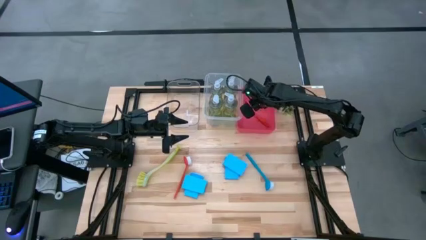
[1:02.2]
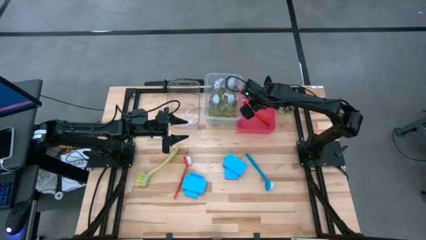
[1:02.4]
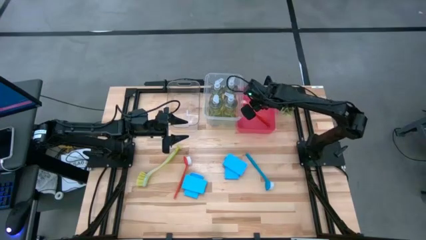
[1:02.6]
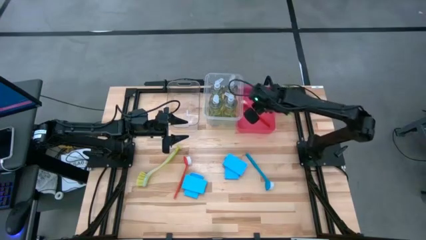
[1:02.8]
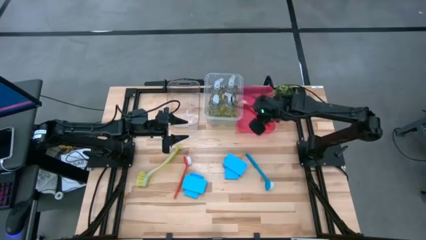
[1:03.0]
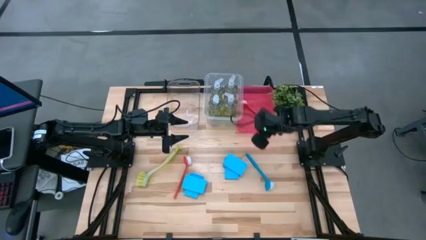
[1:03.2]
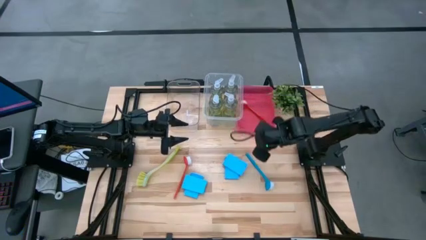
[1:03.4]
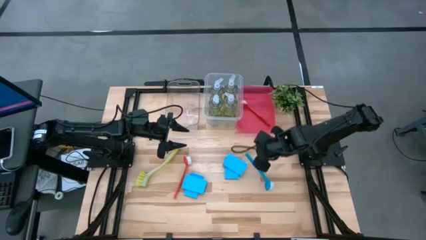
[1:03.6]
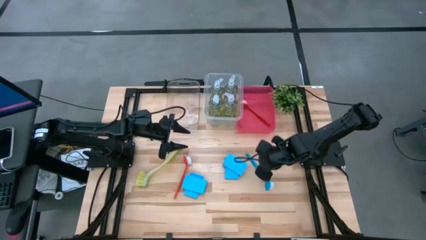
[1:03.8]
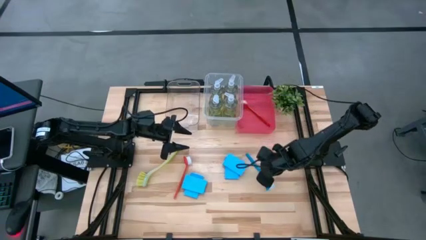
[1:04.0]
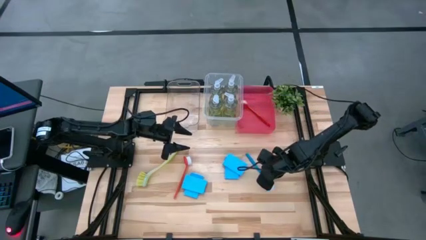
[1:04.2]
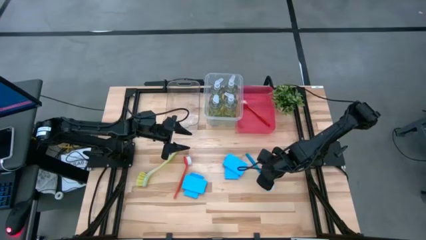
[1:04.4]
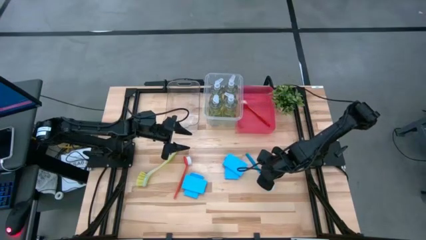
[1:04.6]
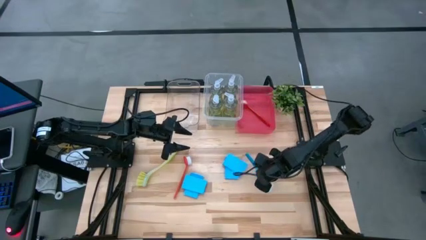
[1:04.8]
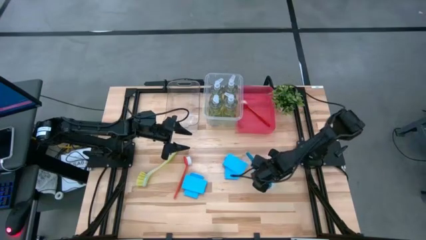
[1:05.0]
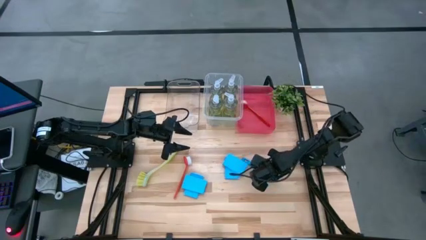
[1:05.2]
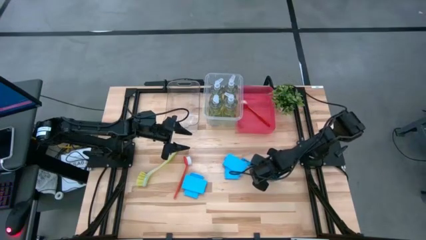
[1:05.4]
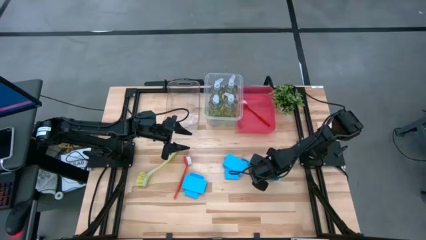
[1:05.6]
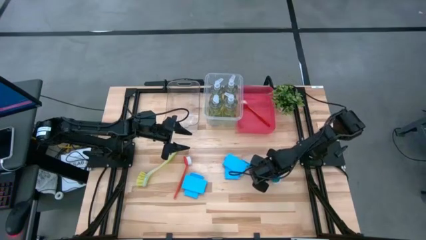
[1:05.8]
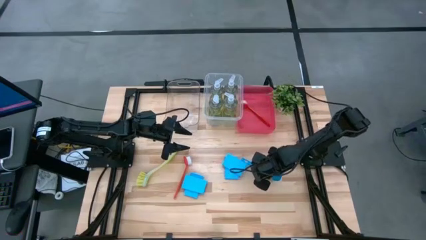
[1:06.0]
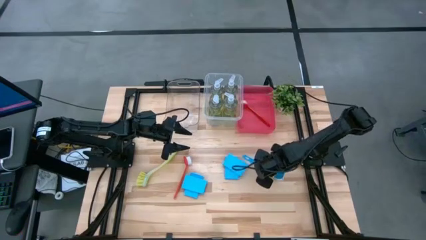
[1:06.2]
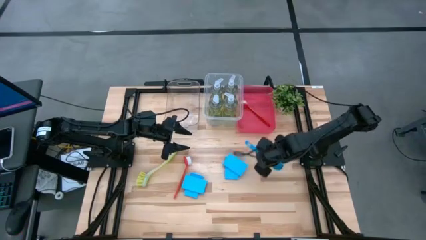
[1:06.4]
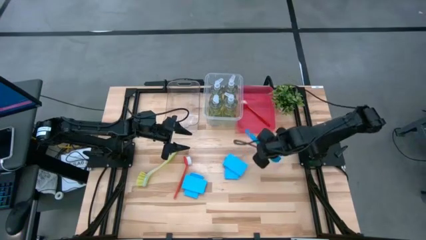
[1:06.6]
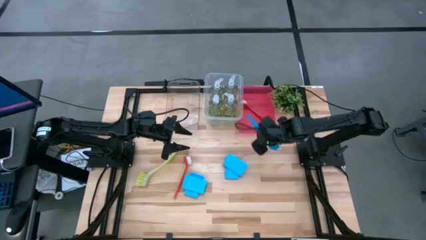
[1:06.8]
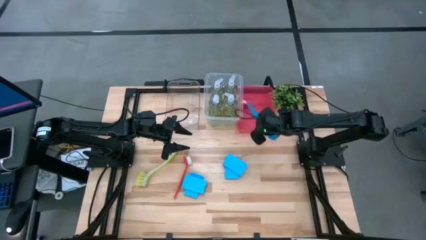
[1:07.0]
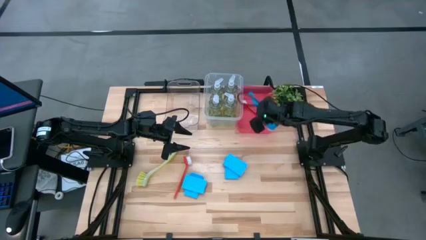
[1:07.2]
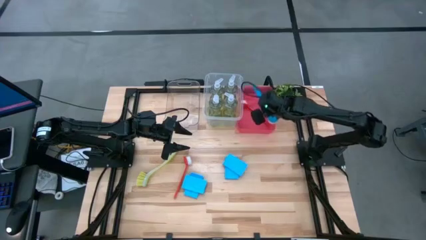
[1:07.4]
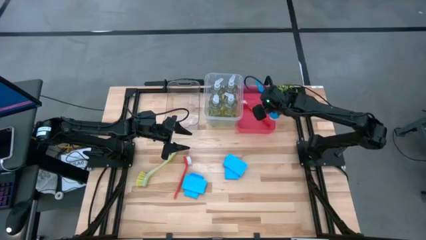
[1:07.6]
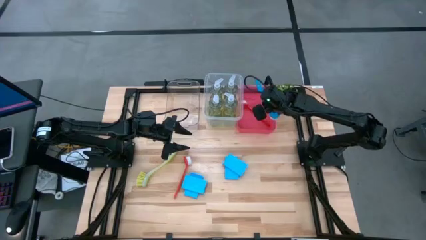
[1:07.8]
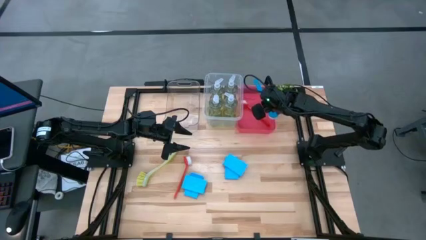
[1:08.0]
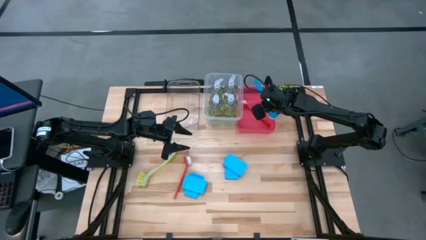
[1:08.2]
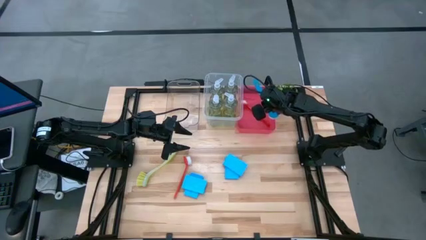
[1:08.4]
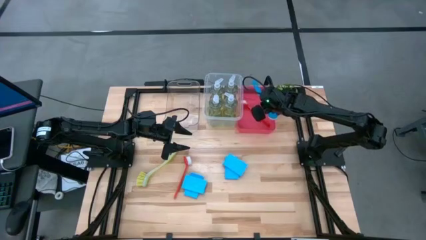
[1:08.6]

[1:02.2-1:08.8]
Task: Pick & Place Kitchen Sink Supplies
Put the blue dish brush into the pink bin

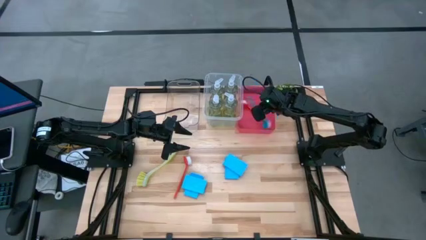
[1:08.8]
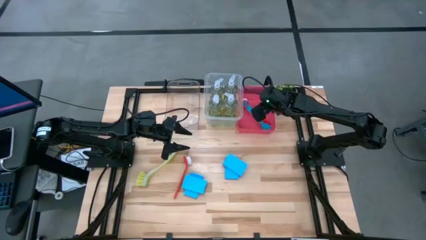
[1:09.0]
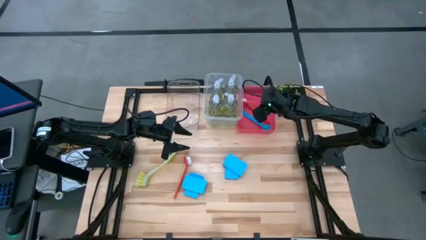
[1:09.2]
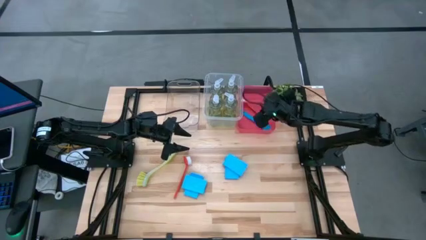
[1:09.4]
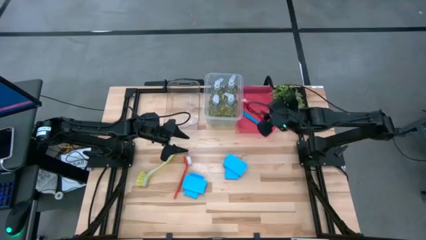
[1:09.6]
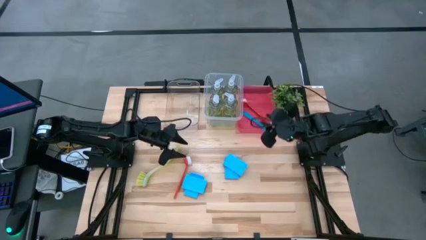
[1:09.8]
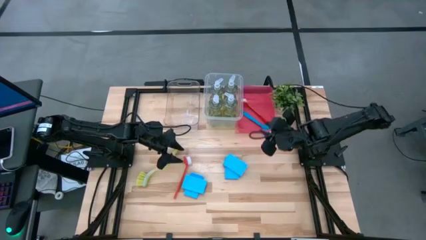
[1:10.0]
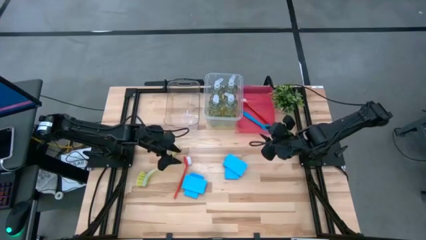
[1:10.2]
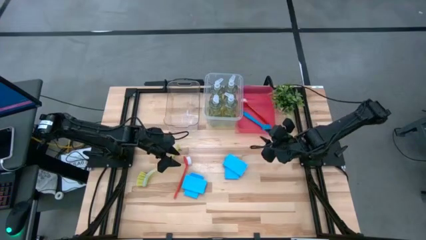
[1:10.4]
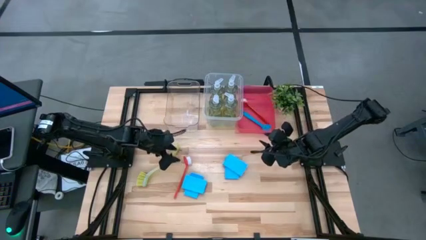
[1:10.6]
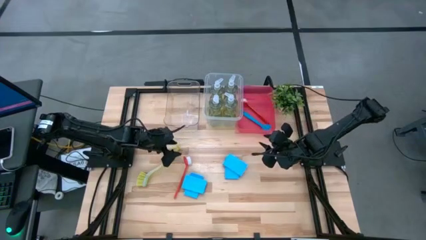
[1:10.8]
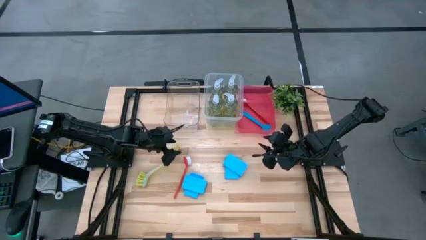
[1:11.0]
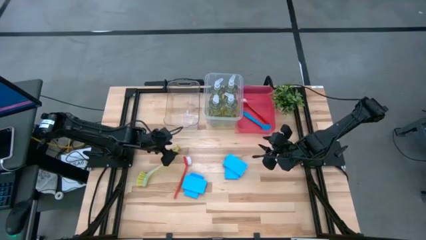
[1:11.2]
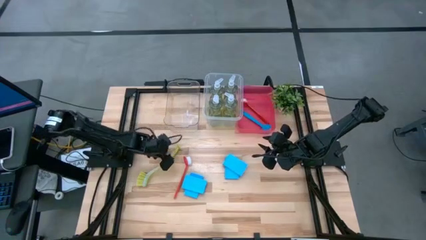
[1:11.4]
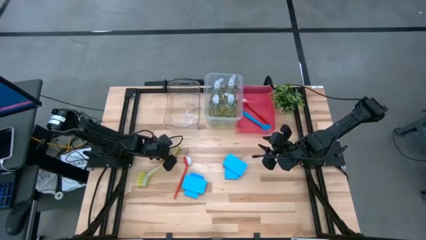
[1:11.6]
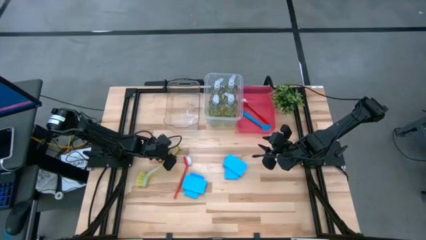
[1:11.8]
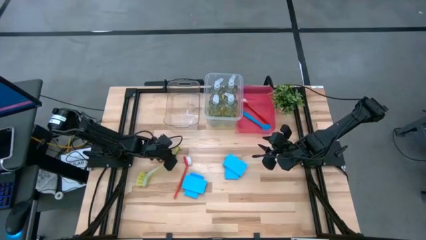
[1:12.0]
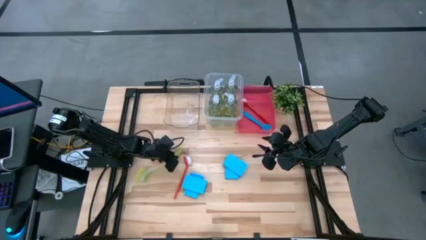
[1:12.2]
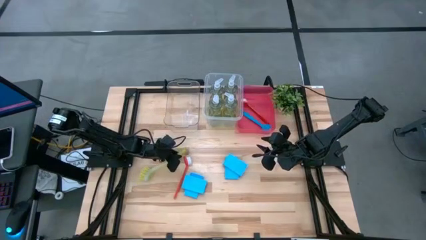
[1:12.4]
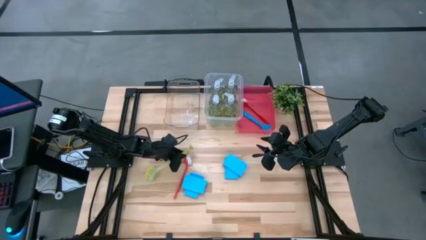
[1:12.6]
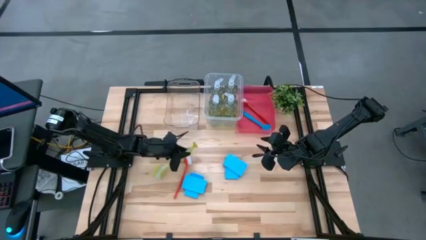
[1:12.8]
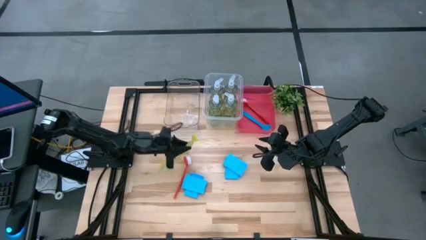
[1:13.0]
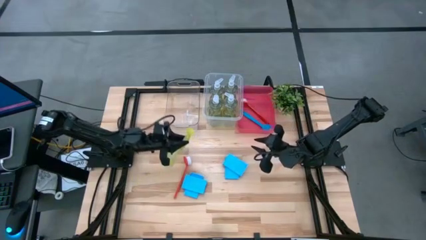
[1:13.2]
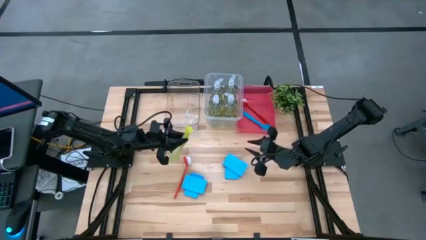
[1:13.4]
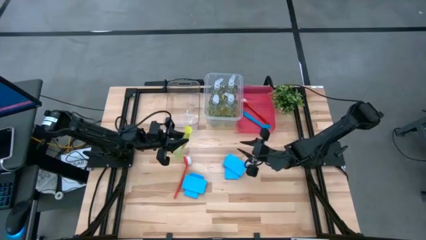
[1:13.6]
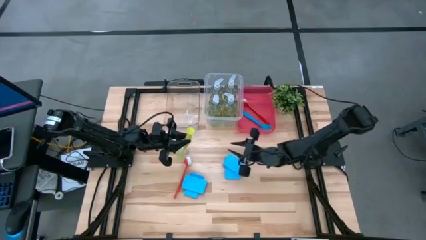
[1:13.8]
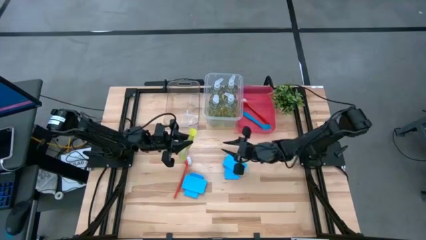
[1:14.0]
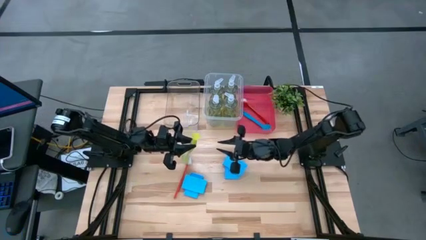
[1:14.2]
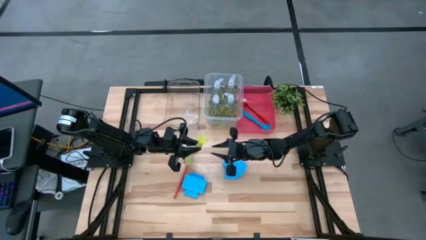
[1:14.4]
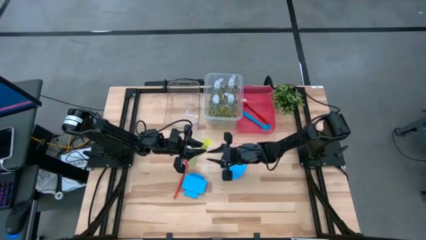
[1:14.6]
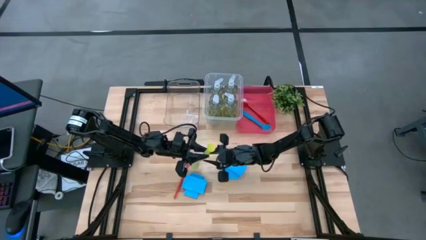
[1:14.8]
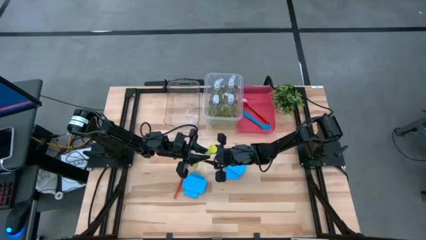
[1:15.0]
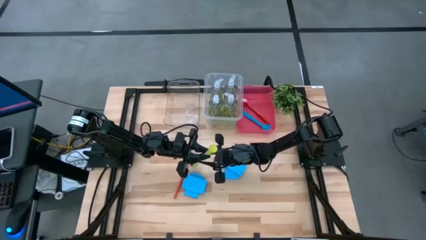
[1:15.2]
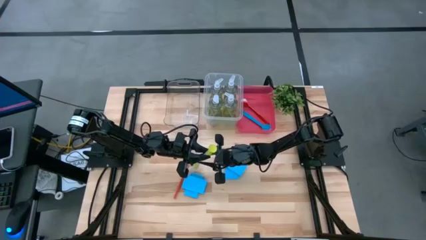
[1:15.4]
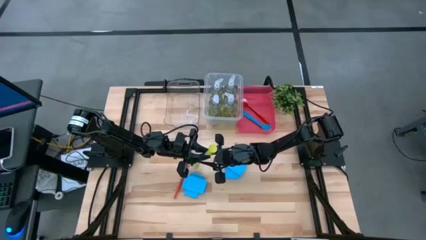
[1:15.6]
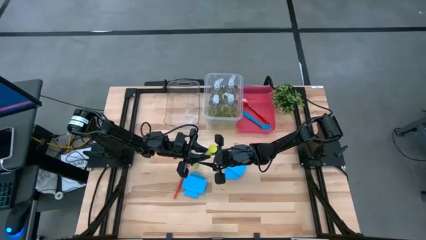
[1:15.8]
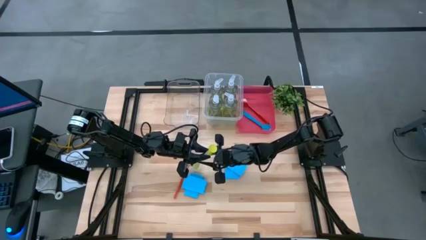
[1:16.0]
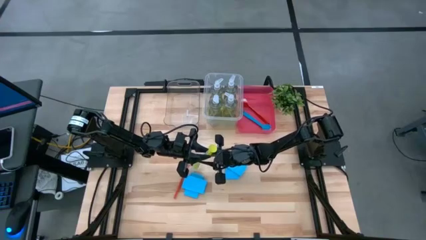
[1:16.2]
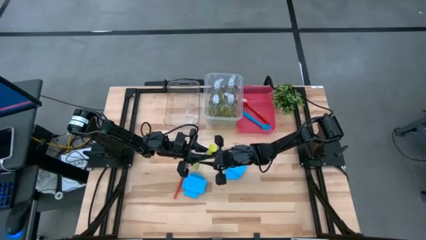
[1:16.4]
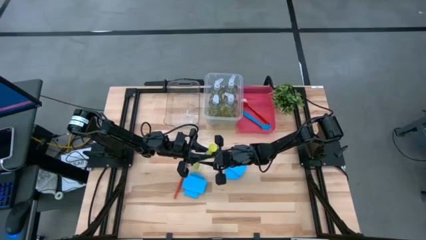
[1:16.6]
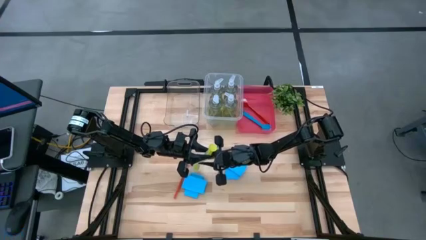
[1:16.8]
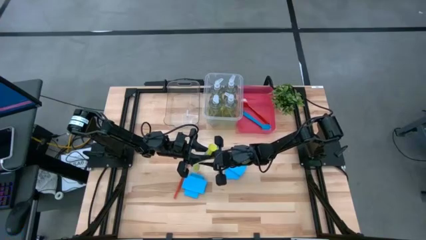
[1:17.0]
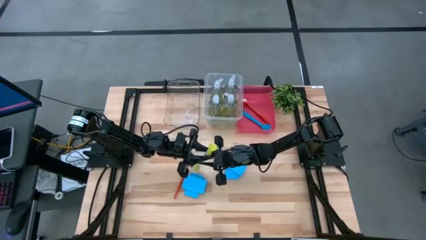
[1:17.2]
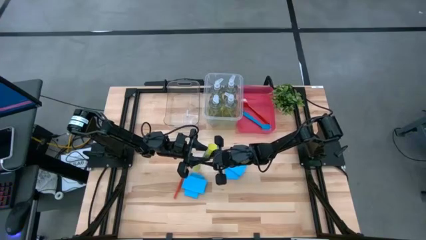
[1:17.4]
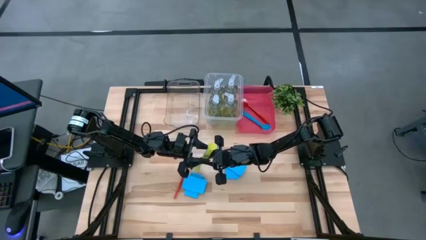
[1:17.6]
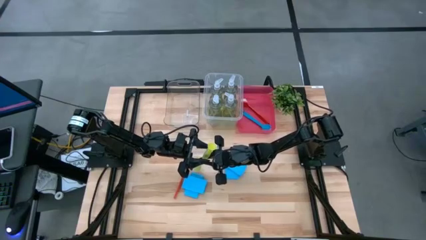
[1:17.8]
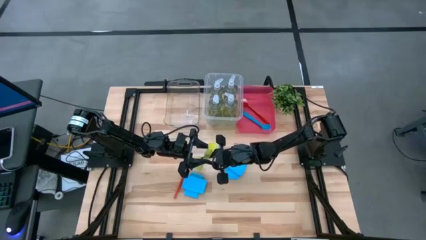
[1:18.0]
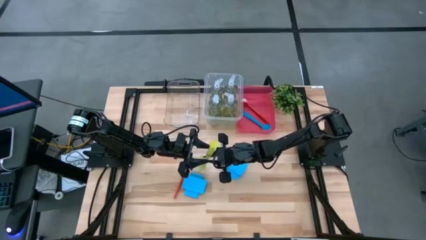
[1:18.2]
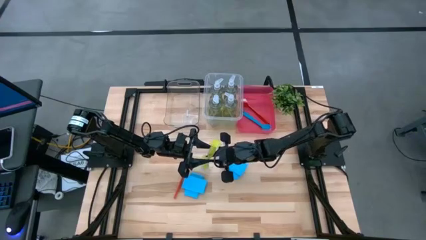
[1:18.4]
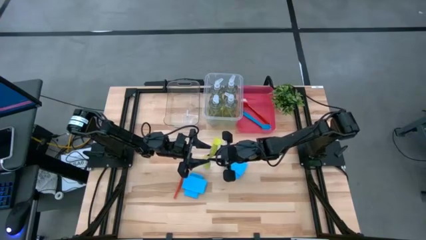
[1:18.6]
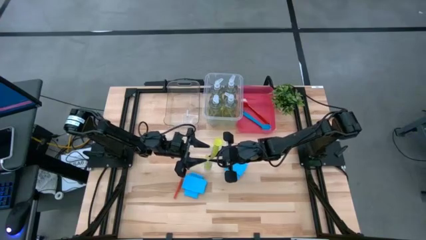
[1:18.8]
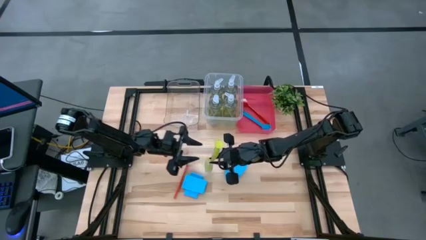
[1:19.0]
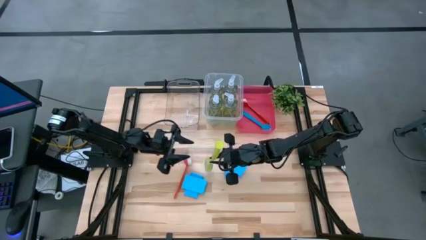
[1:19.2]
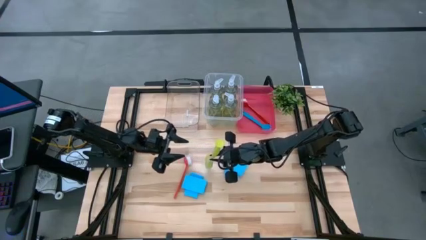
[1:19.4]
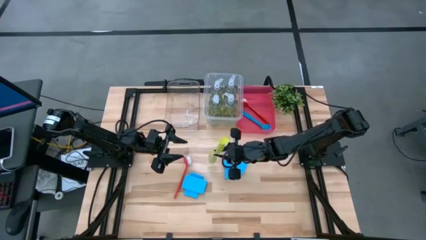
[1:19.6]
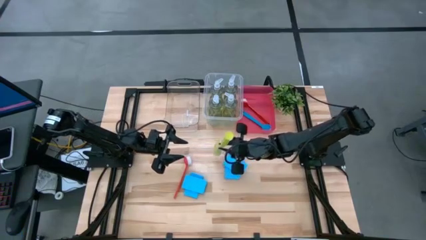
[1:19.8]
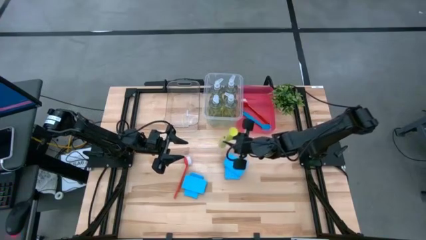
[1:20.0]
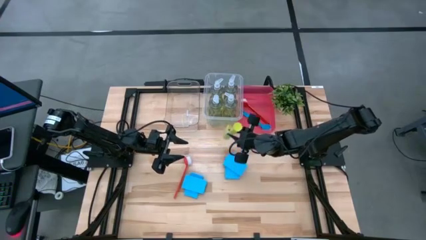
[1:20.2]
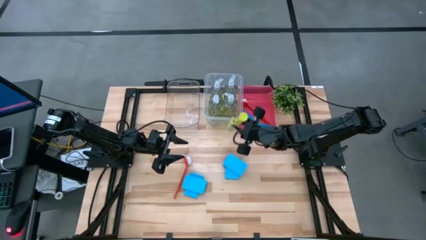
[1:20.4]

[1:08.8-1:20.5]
Put the green dish brush into the pink bin
